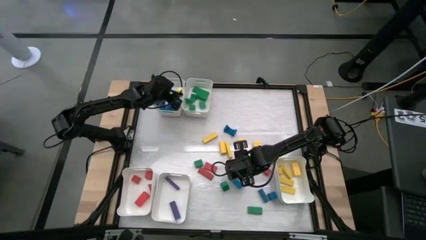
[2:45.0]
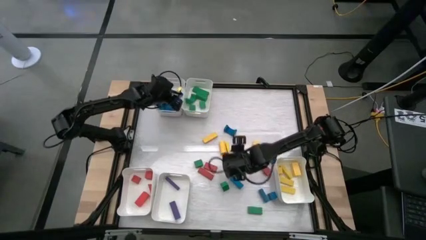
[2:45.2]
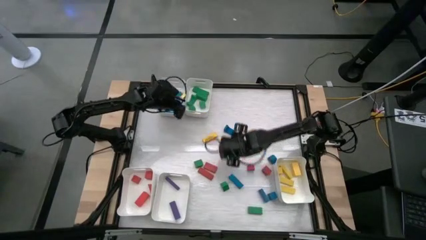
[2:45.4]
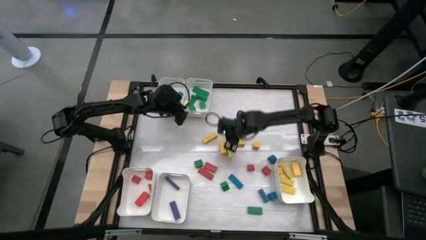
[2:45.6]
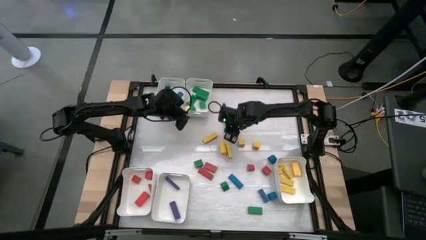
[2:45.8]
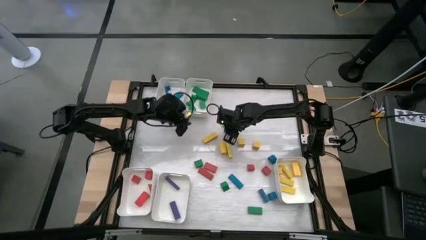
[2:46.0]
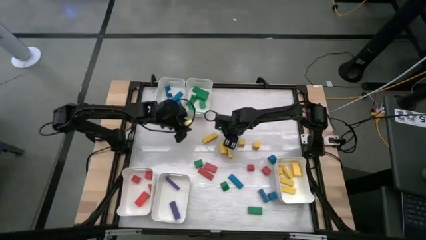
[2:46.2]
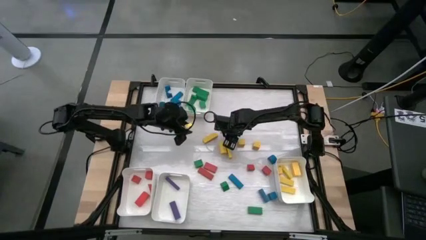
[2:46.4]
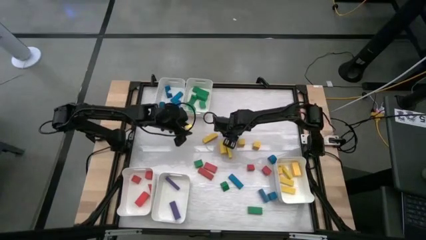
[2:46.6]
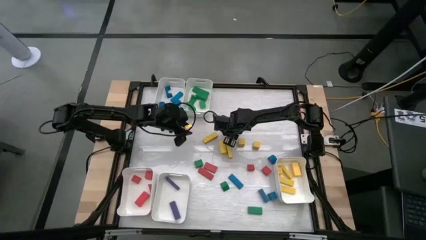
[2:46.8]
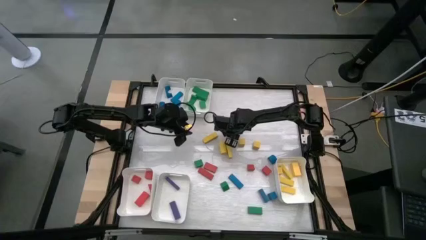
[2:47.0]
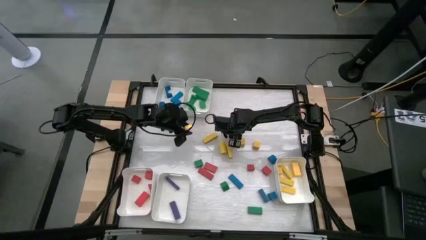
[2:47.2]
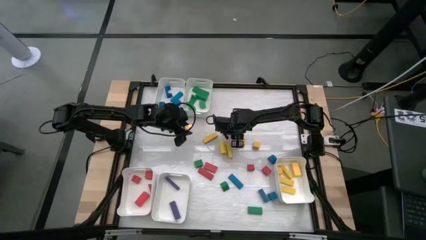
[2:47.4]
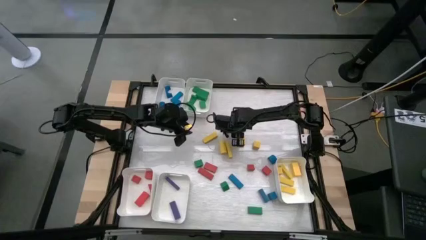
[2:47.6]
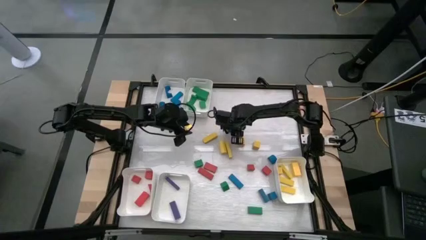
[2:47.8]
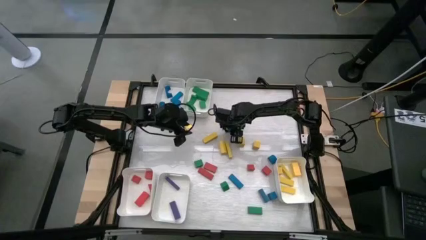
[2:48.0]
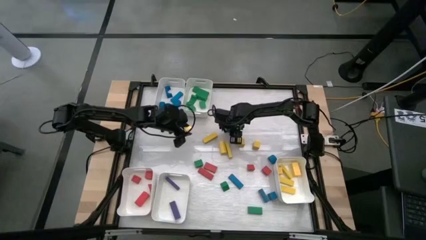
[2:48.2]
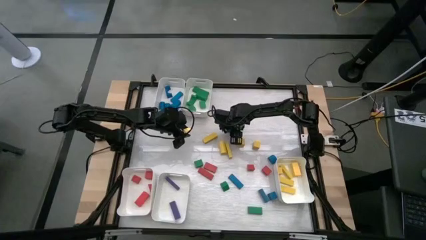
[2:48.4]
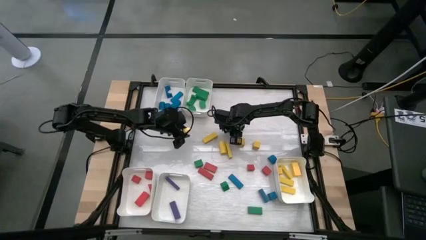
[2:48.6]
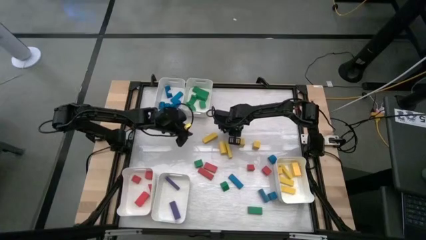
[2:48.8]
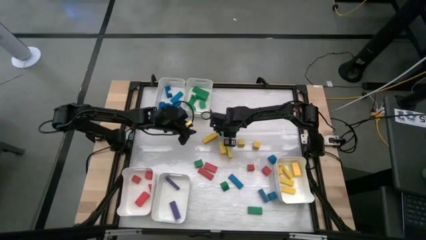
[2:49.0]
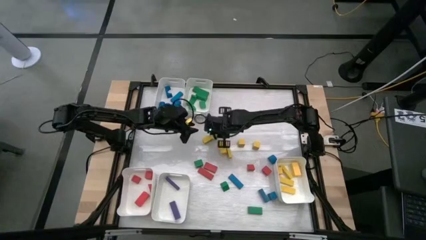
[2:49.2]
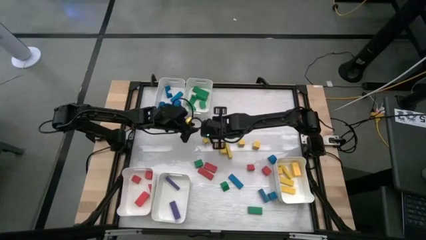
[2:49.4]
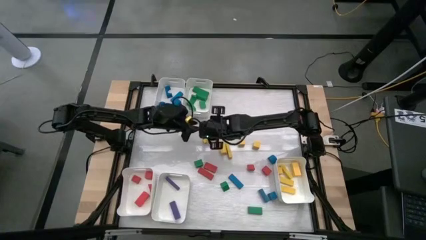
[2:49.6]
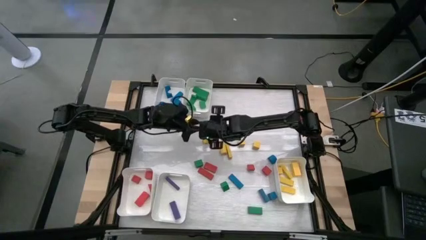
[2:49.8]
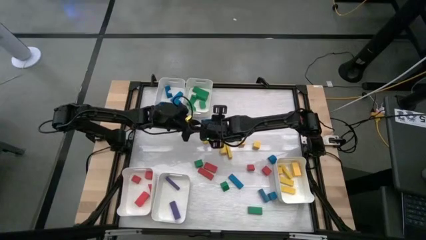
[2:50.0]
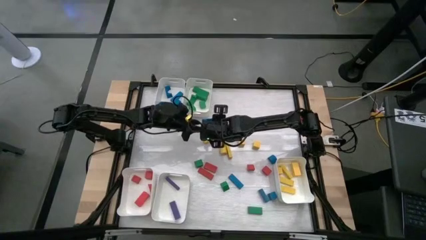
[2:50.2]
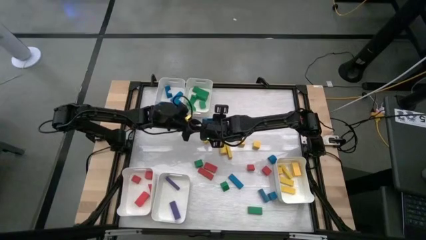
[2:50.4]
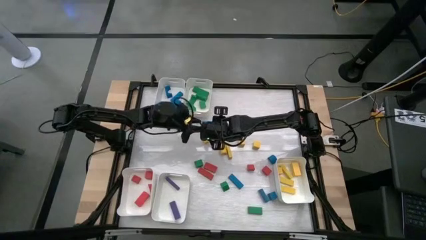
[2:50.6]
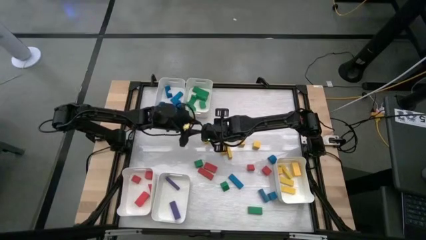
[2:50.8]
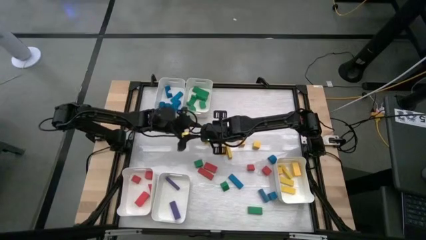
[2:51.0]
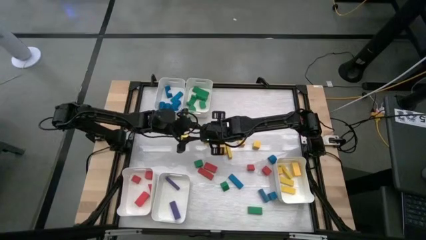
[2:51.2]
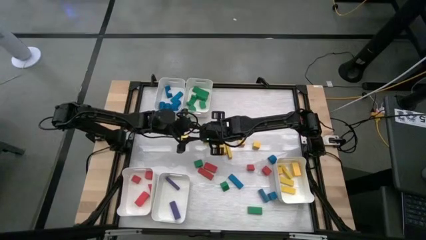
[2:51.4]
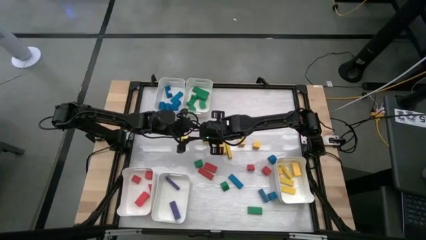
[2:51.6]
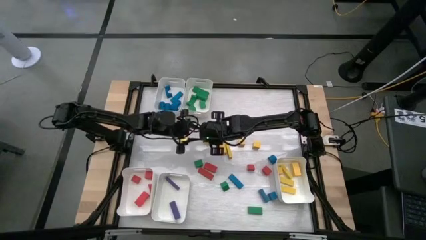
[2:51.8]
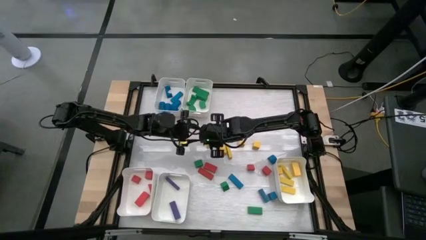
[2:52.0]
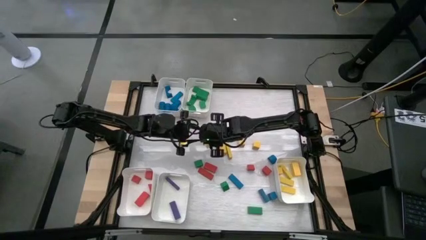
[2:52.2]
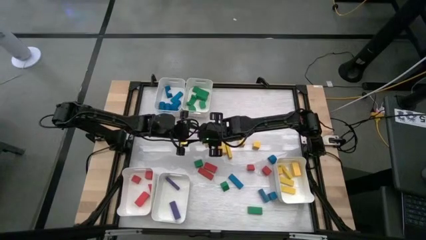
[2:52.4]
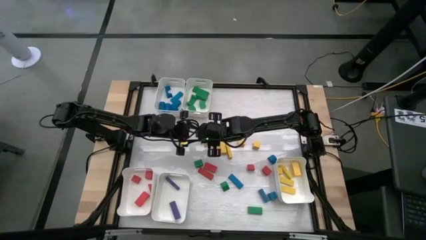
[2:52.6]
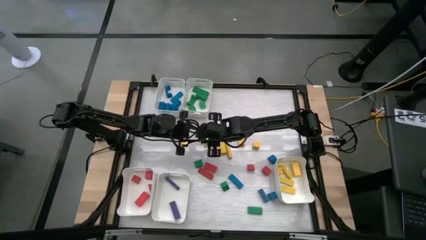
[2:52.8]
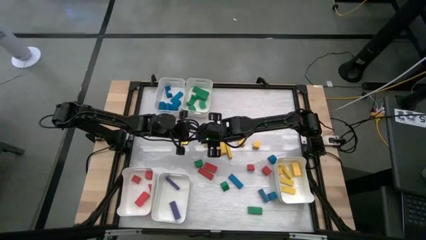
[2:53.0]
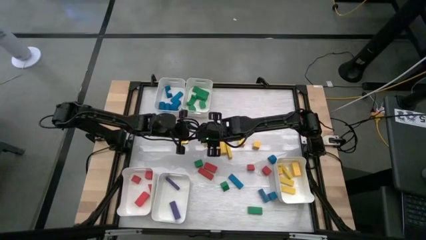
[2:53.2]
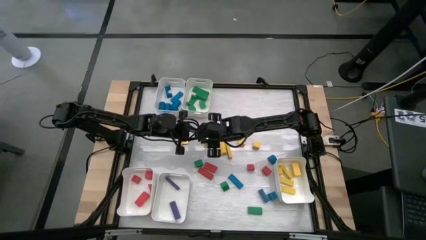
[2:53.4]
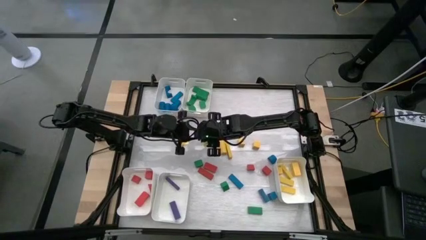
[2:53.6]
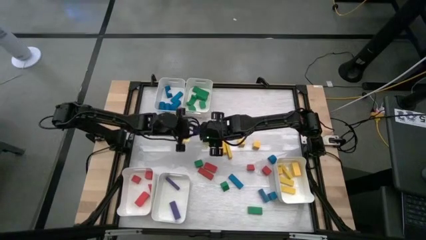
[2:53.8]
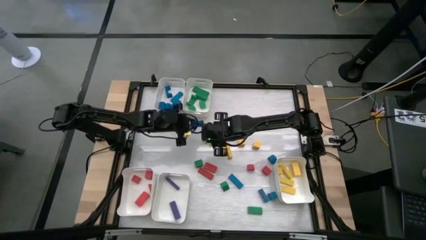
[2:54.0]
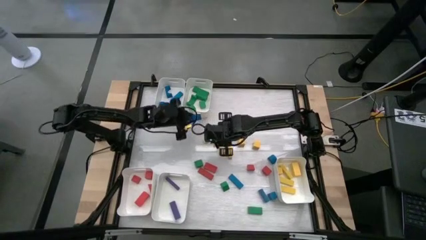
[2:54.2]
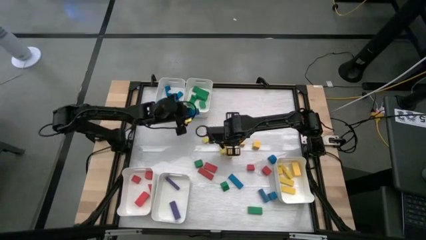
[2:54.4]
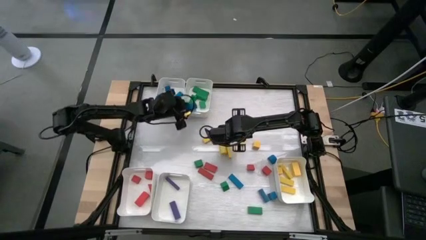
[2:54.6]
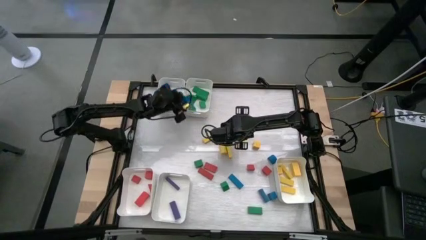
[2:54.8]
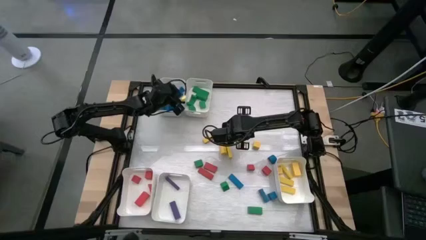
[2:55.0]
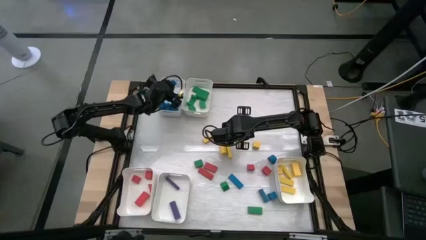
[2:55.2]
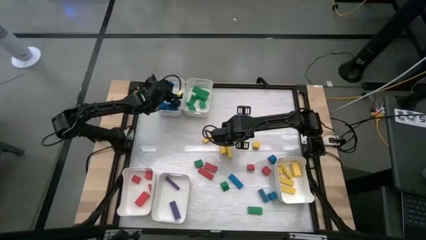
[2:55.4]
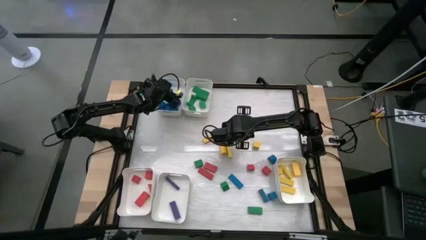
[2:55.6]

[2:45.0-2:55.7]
Task: Sort blocks
Put the blue block into the top left white bin

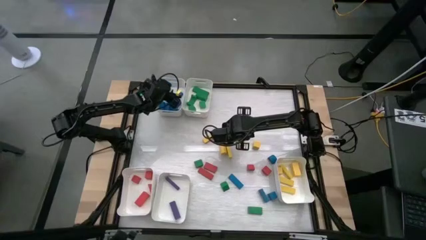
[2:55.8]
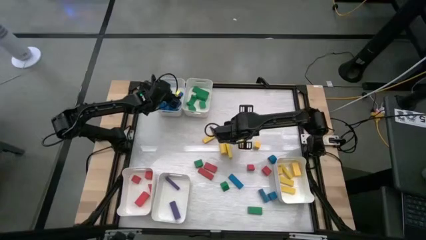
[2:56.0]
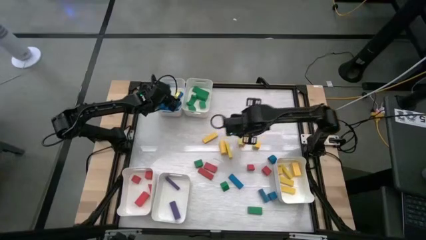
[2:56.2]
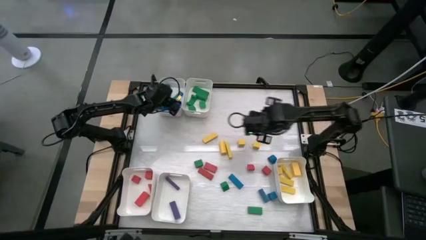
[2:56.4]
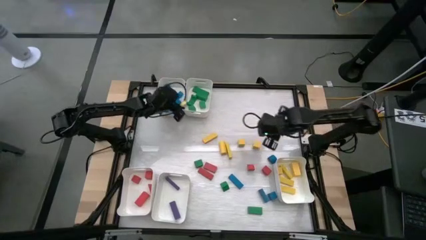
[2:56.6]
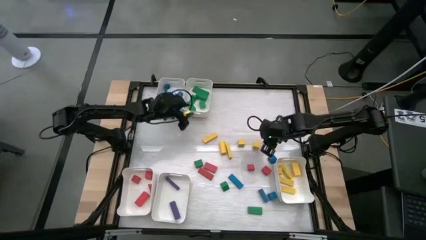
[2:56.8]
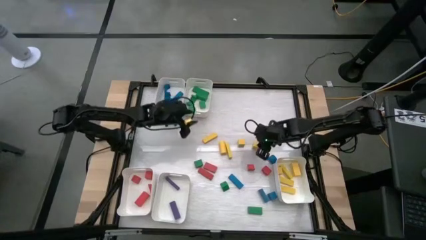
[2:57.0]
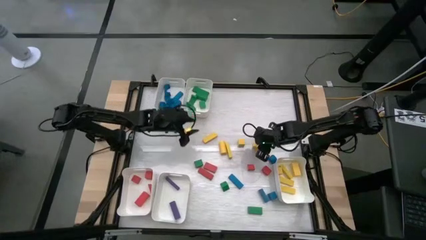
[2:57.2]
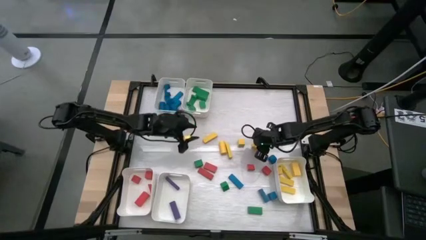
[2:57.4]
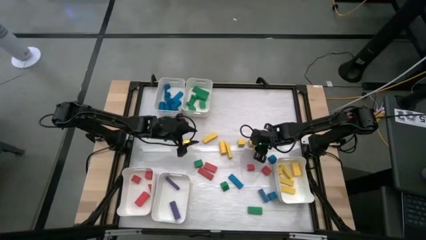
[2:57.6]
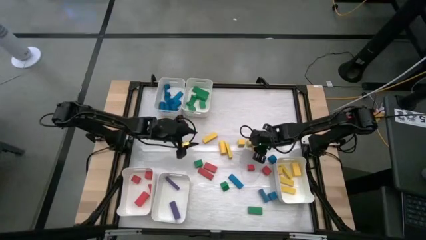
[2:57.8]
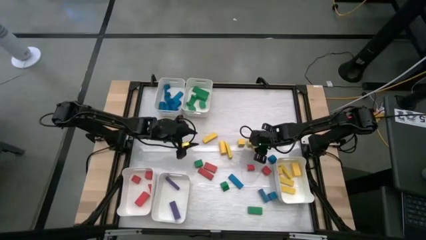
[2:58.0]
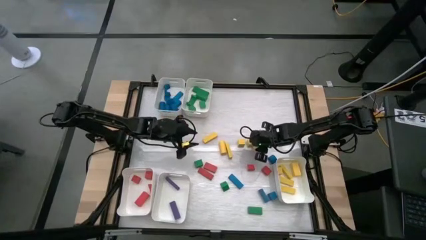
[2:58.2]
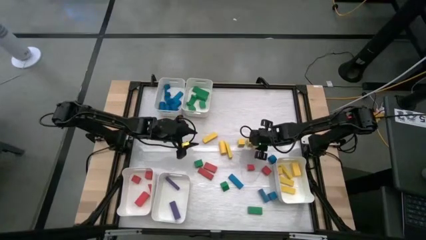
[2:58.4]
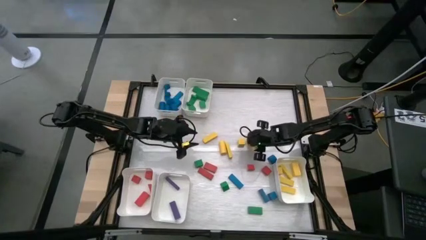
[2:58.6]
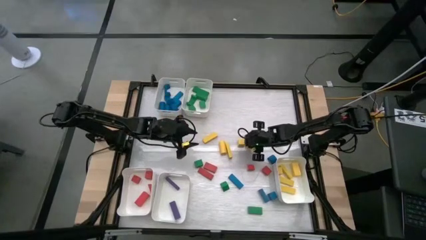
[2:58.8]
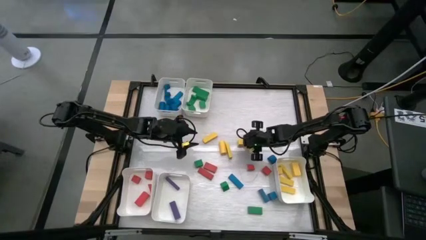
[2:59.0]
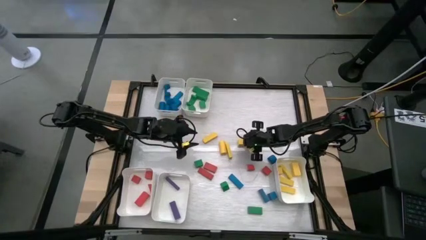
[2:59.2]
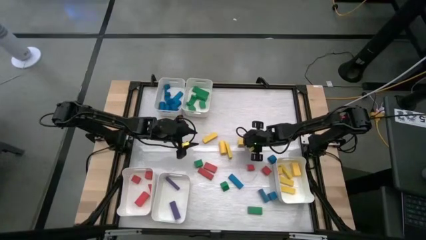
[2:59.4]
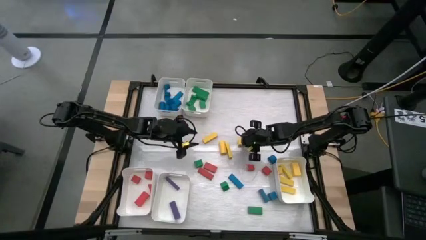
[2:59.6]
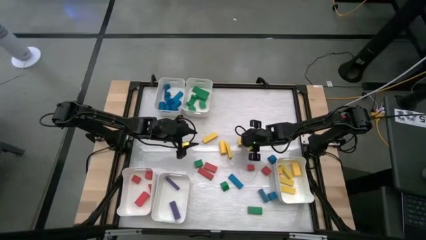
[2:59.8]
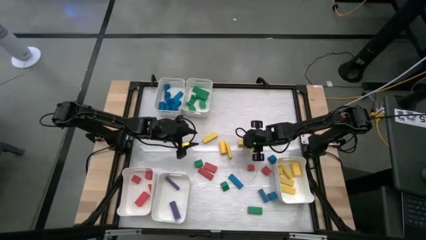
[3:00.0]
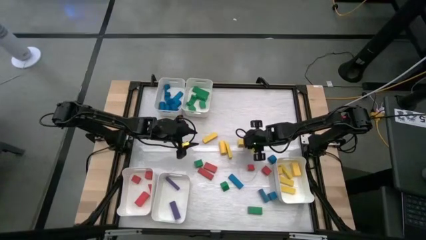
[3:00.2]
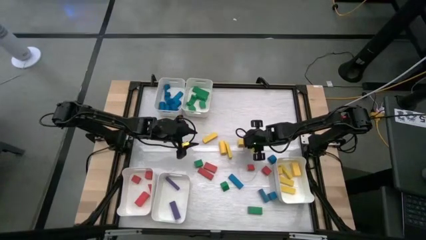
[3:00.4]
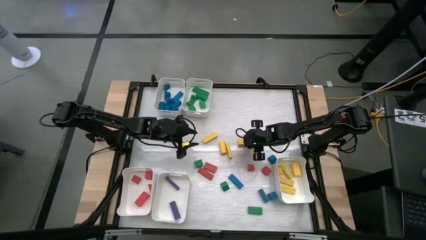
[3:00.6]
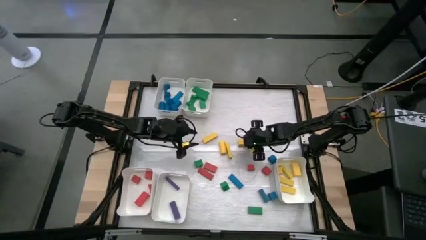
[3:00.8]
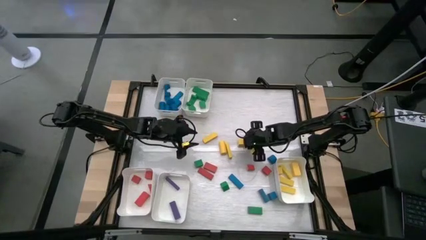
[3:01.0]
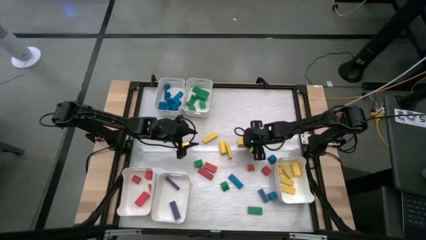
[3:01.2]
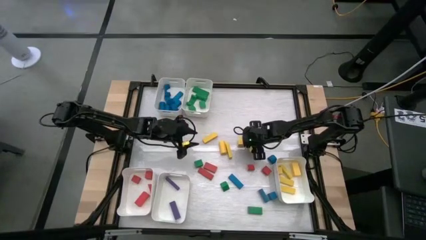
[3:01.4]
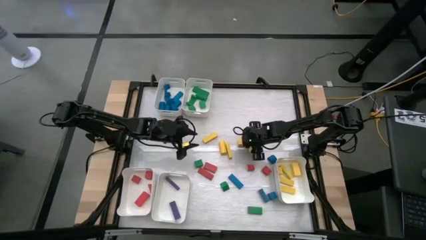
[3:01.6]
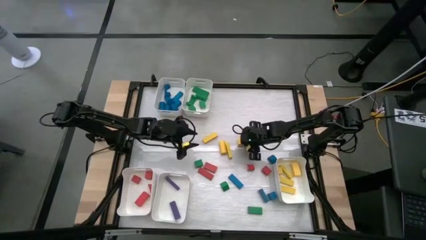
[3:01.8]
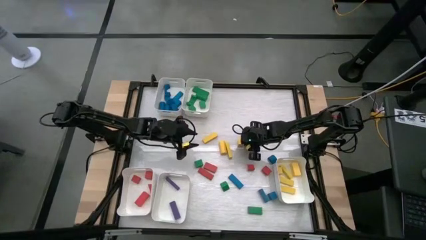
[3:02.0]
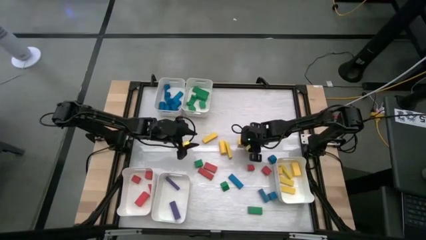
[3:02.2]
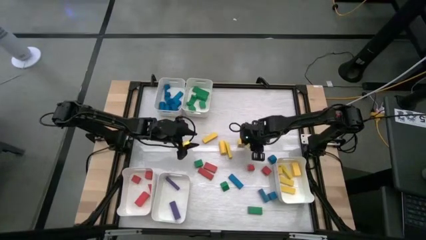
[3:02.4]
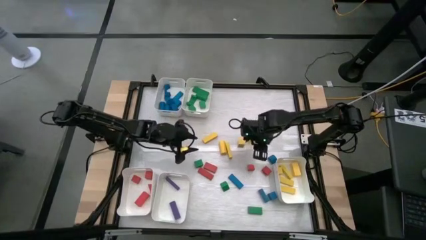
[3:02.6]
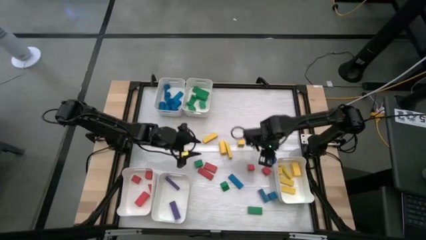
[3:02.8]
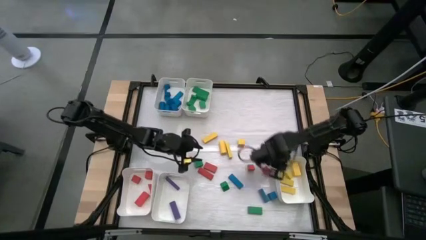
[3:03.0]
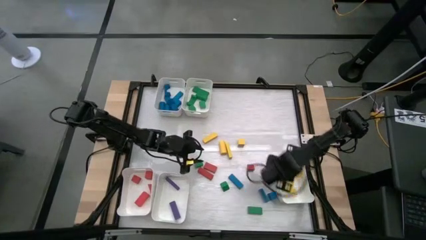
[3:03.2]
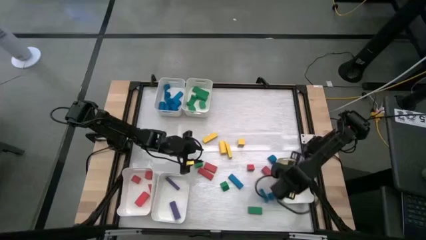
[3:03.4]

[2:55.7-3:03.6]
Put the yellow block into the bottom right white bin
